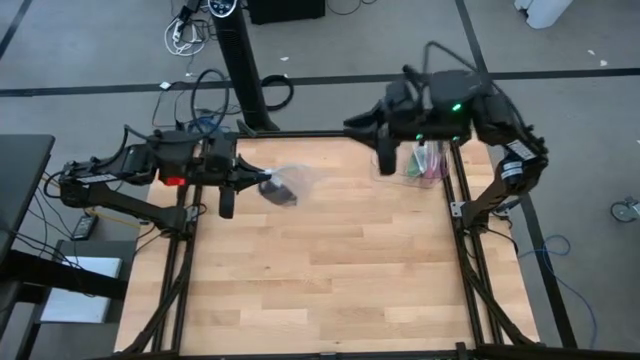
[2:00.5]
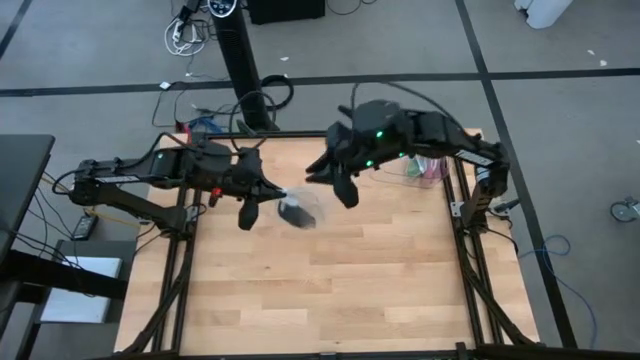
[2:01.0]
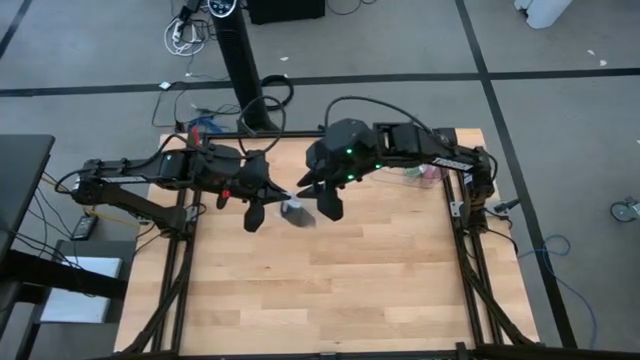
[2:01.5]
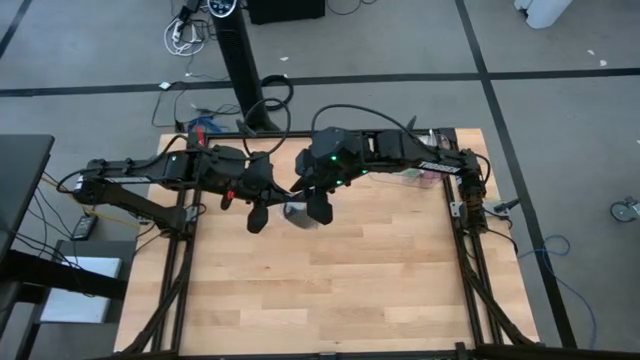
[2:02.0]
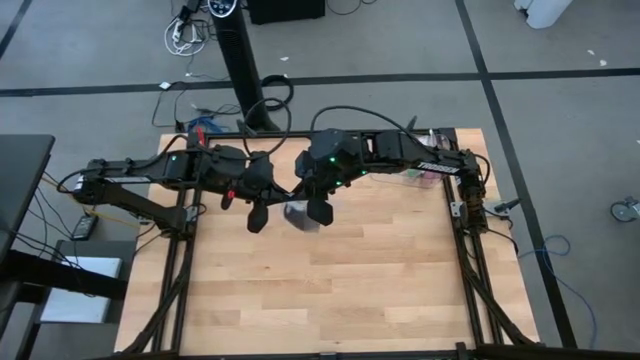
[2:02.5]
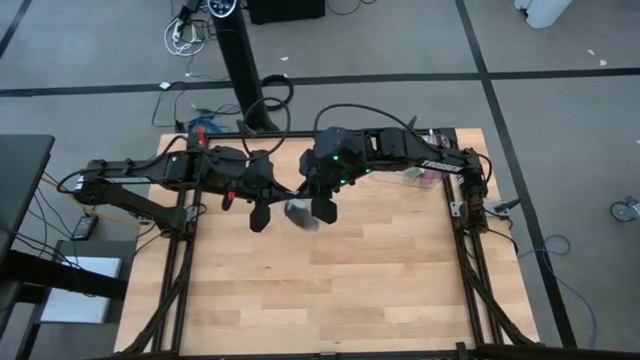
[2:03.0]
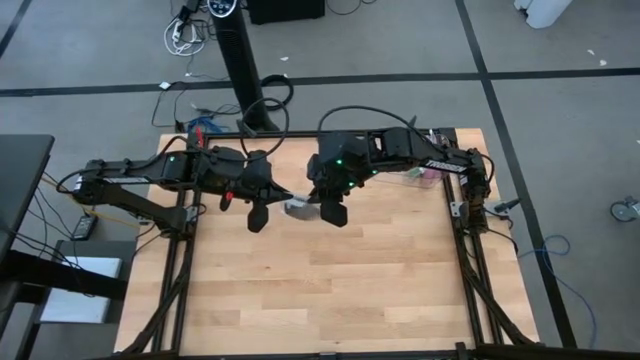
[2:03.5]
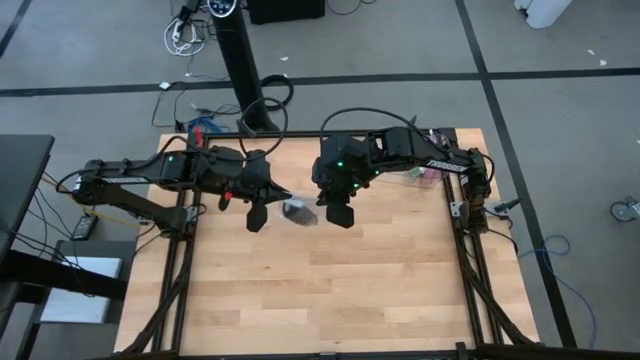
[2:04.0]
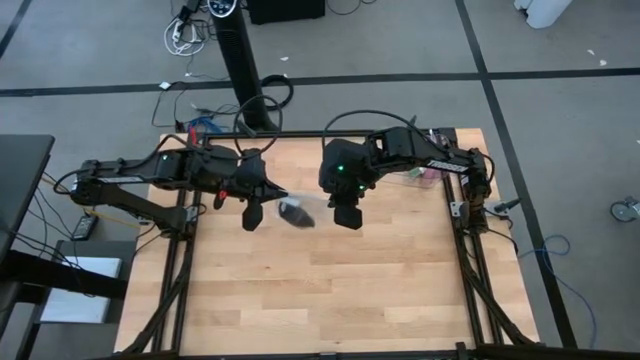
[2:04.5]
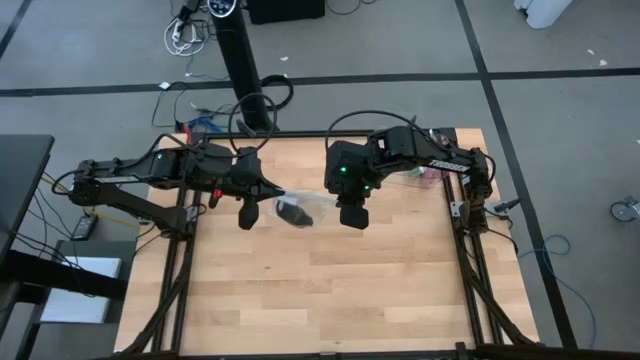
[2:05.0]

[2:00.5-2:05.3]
Task: Roll bandage
Close the transparent ziplock bag

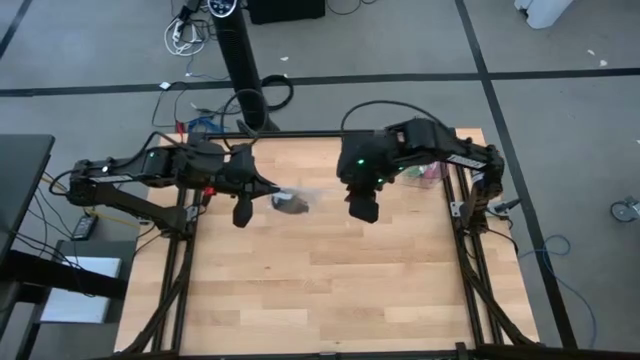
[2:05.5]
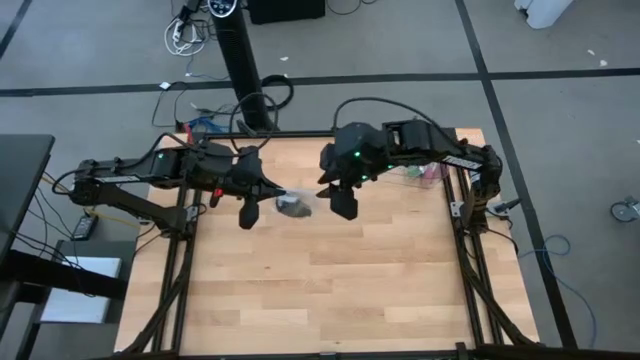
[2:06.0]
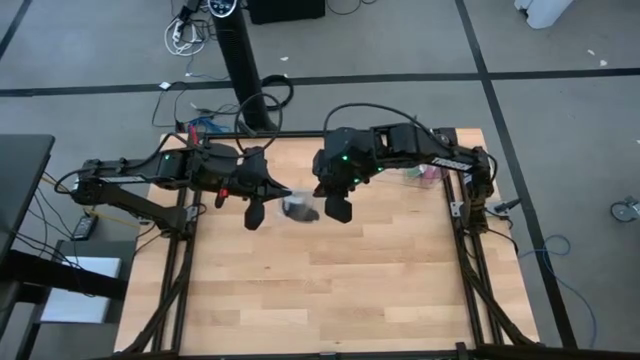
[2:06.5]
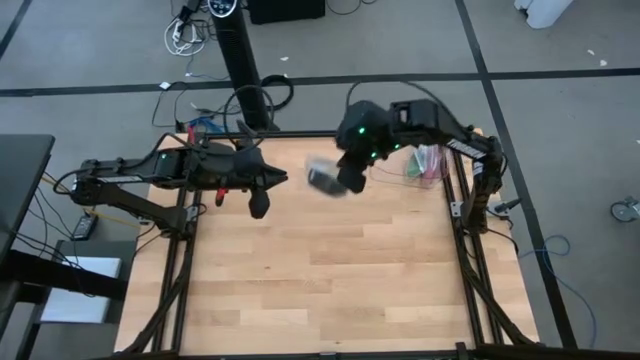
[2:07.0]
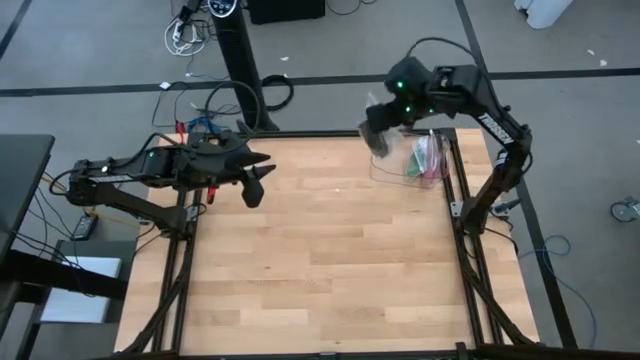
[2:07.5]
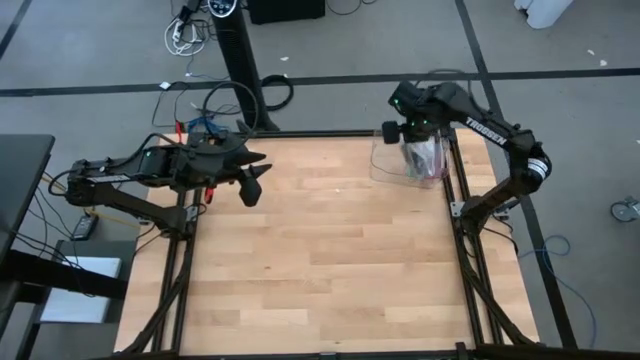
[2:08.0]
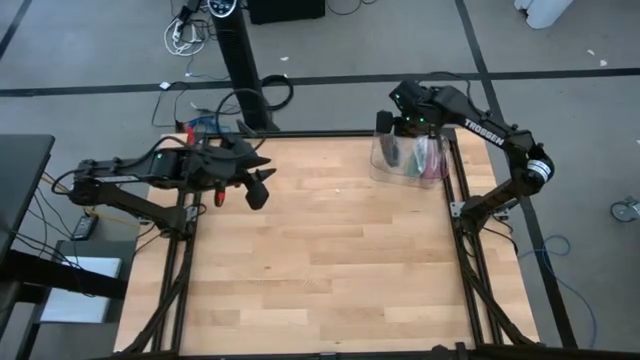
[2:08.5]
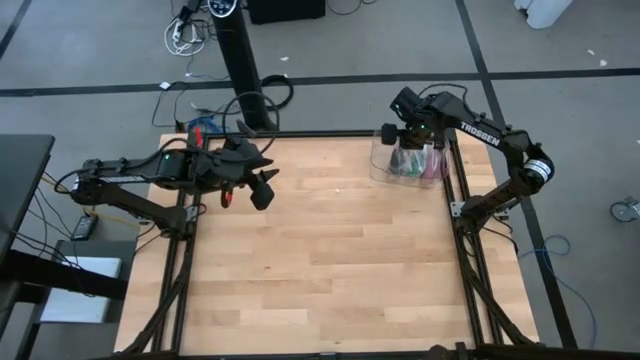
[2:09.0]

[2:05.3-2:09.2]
Put the transparent ziplock bag into the transparent plastic bin

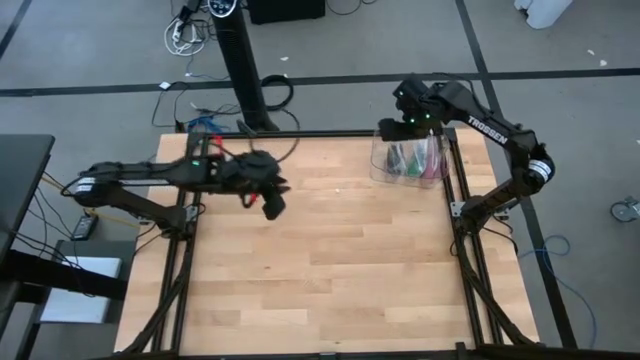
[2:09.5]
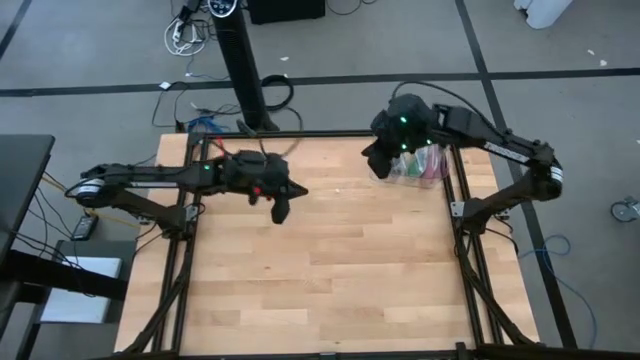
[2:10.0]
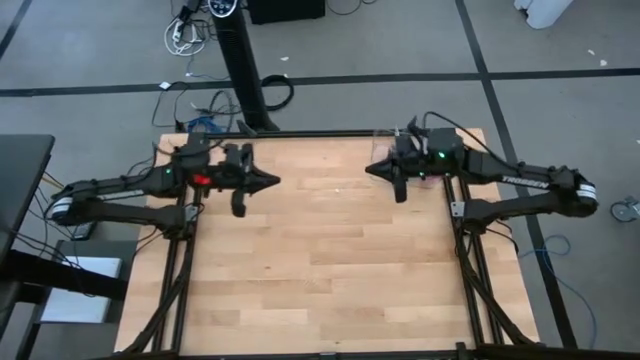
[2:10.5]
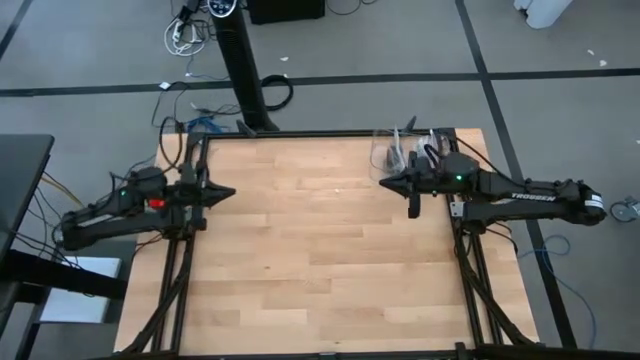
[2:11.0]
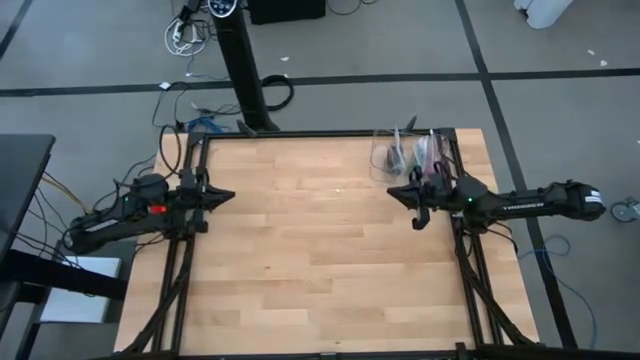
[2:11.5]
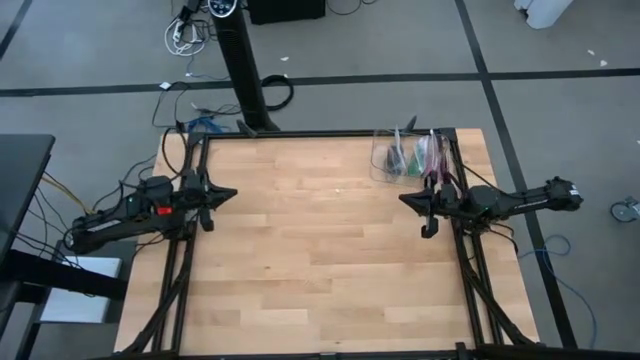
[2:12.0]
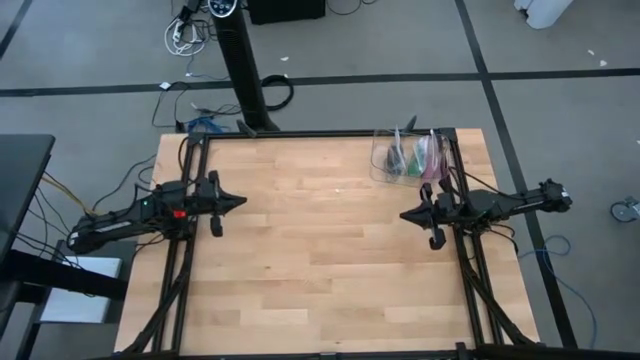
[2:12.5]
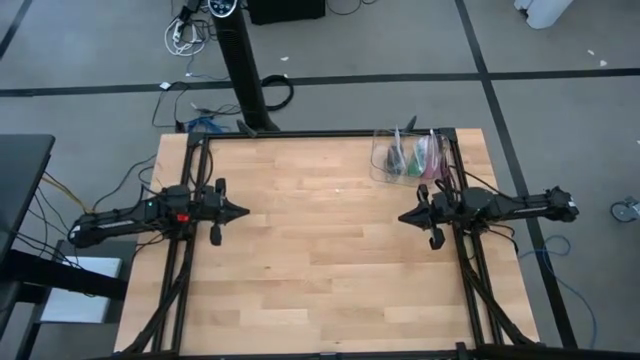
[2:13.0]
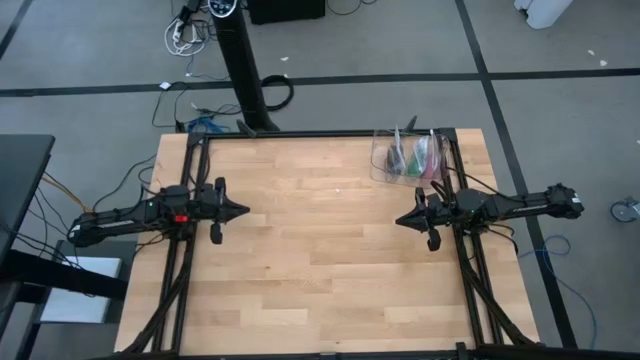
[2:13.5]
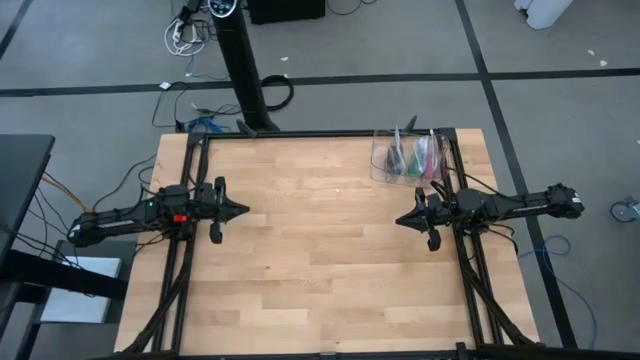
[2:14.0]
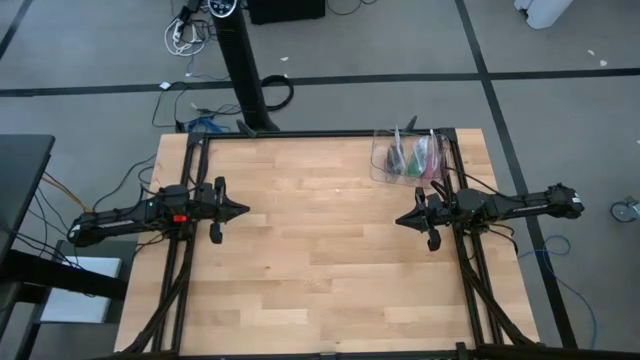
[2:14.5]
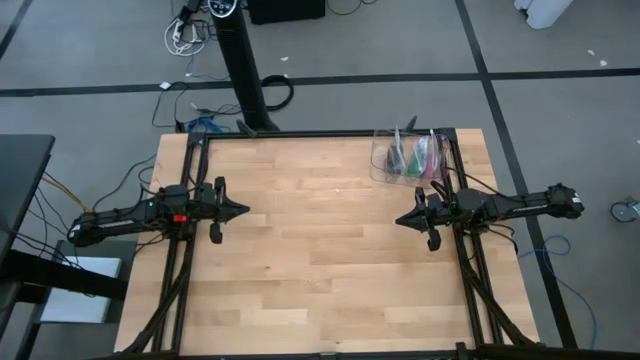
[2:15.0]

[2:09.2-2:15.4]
Return to Home Position

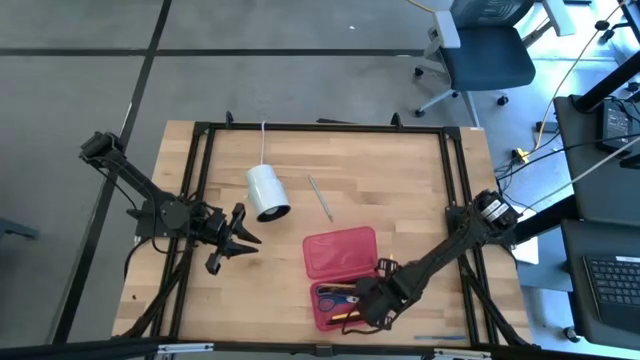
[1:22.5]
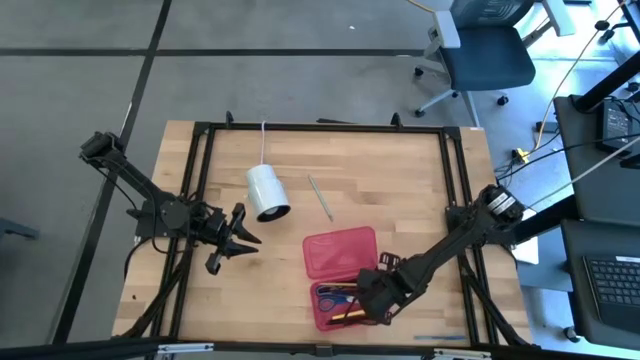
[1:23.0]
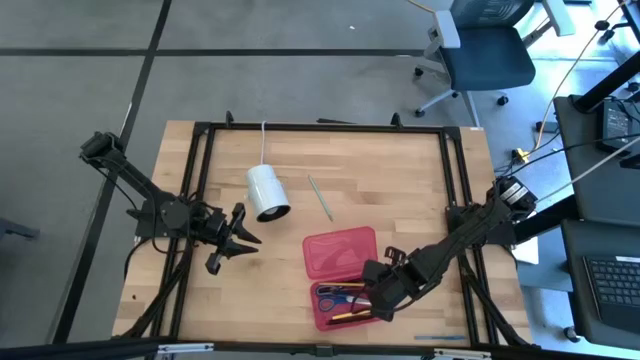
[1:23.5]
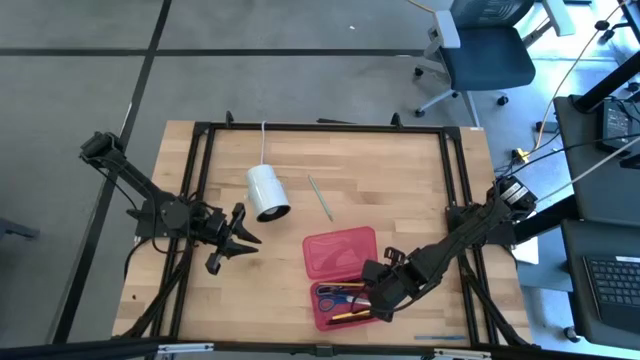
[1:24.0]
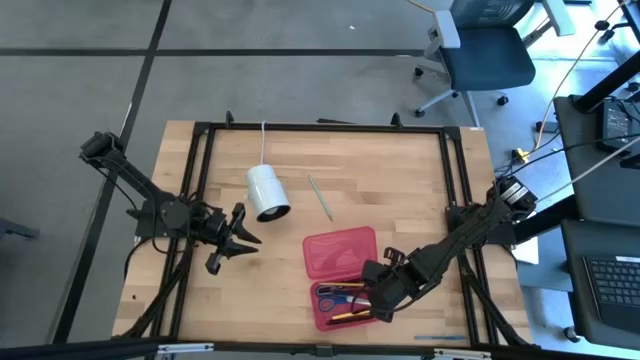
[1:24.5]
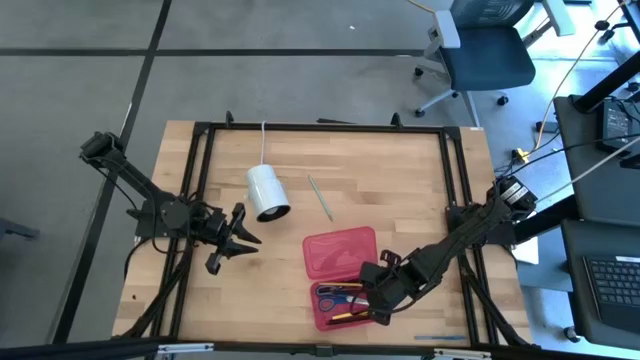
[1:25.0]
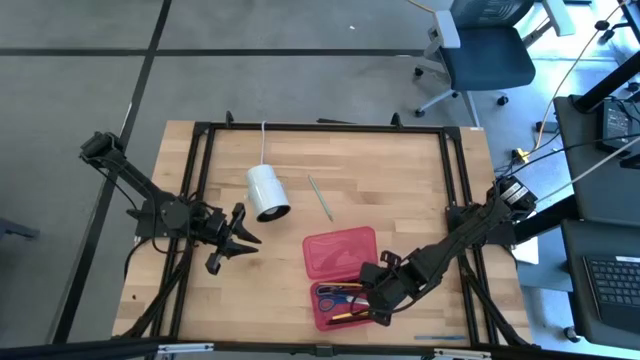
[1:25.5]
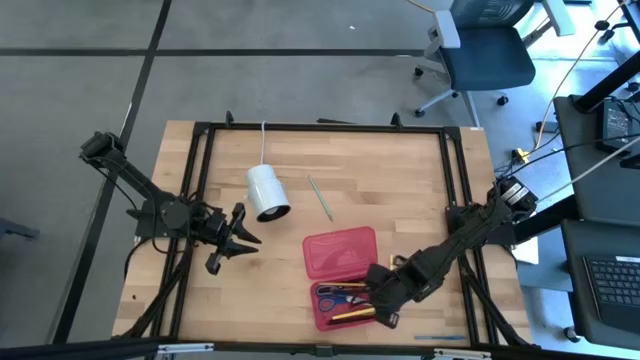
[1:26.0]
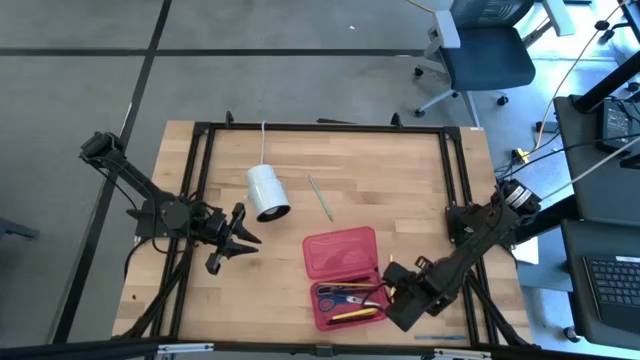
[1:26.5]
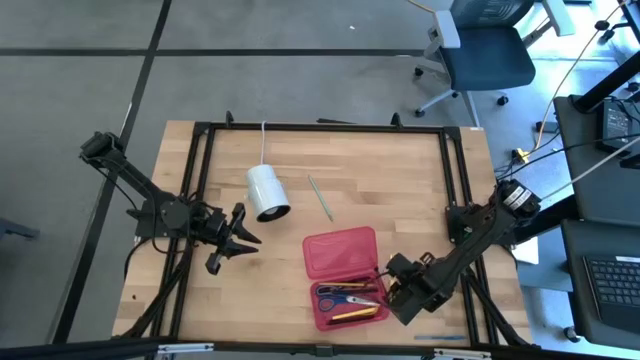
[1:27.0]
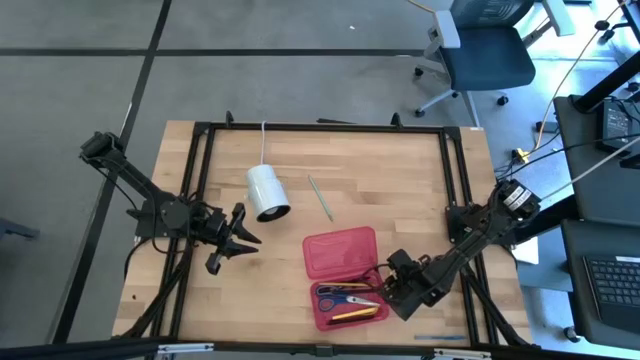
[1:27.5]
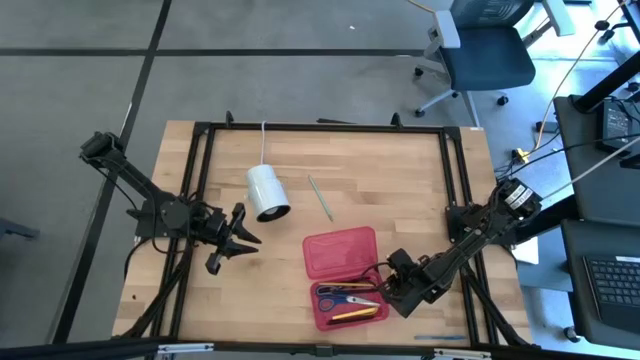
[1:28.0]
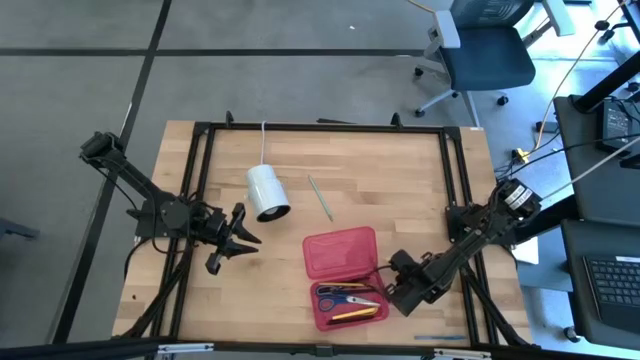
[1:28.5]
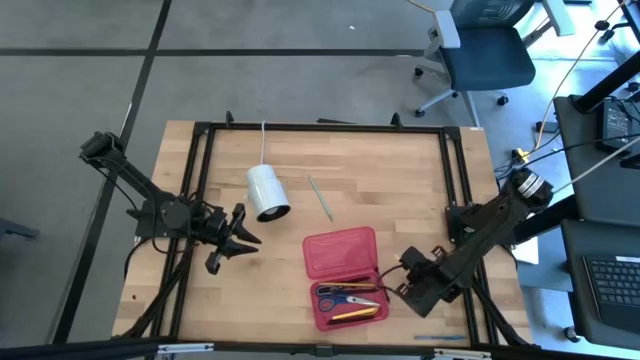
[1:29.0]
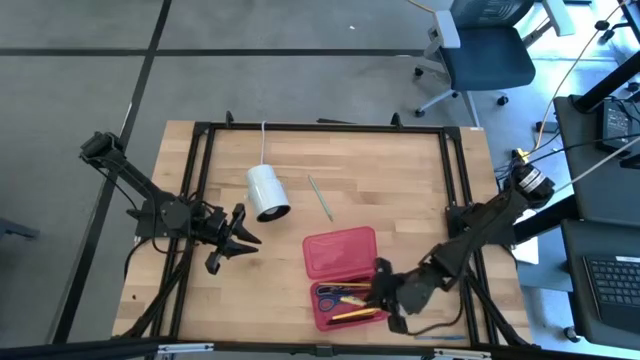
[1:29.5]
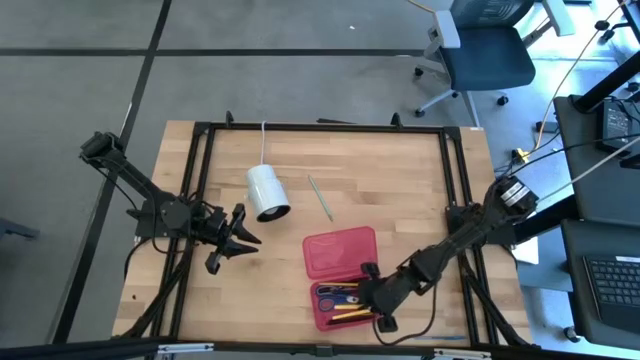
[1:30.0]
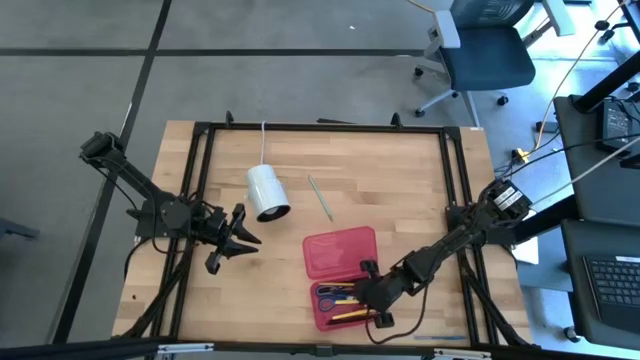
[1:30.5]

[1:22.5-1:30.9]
Task: Pick & place school supplies into a supply box
Put the yellow pen into the pink supply box
